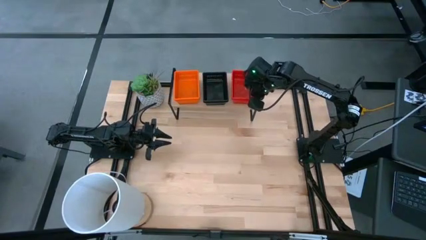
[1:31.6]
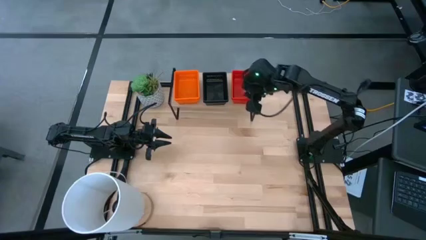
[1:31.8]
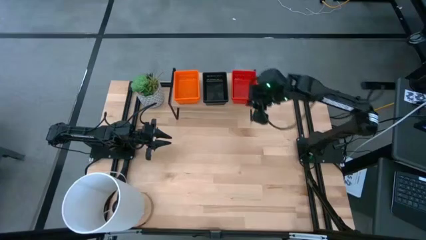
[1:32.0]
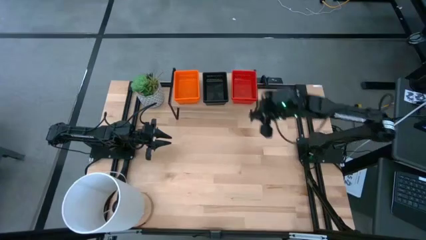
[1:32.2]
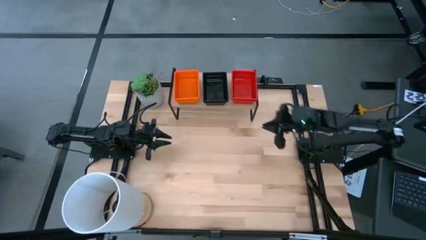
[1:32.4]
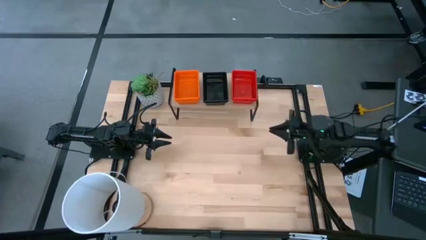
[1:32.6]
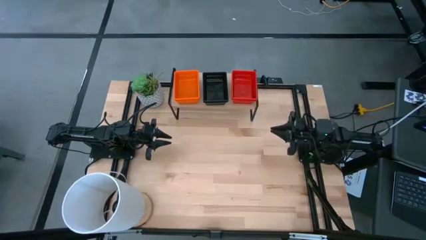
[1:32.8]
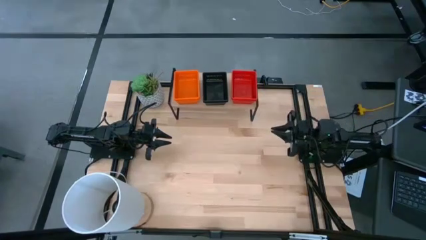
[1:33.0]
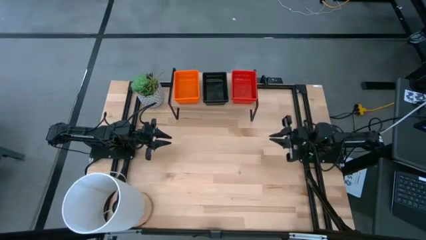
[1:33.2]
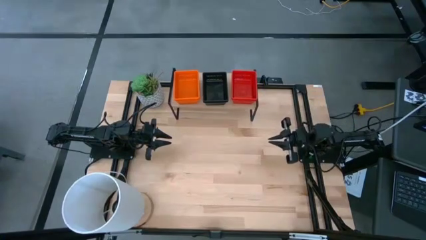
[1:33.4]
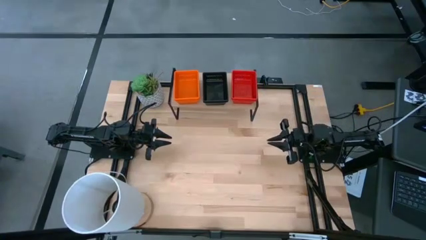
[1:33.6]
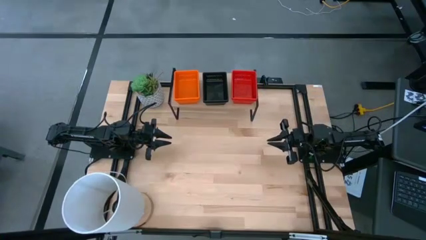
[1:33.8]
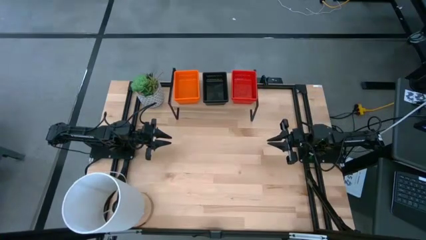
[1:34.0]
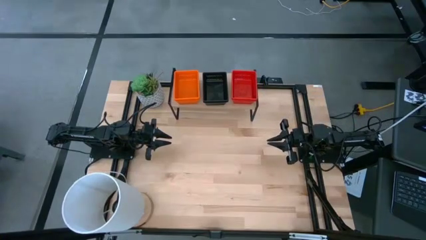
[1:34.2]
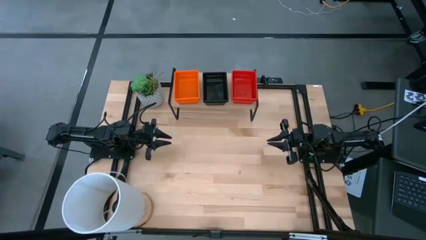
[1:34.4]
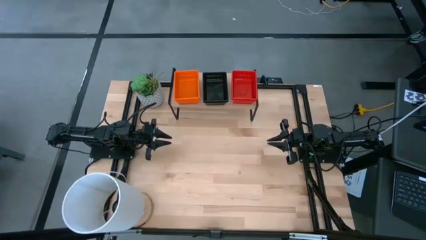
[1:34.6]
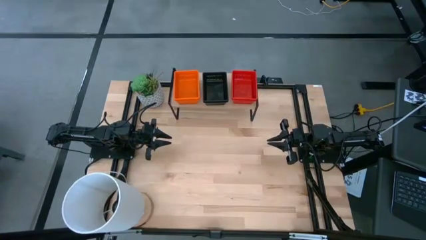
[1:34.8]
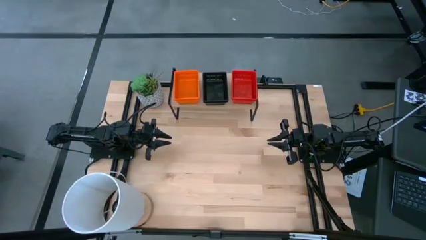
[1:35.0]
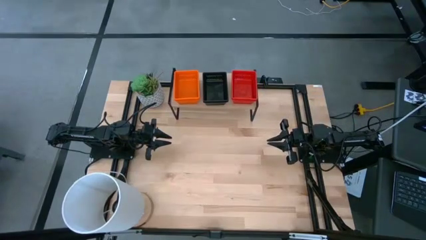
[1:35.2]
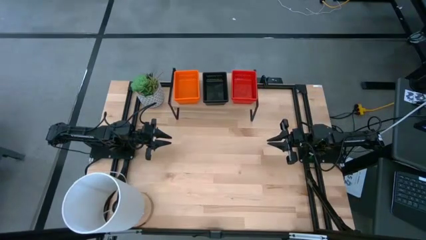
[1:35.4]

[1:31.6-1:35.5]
Task: Stack baskets on shelf by color
Return to Home Position

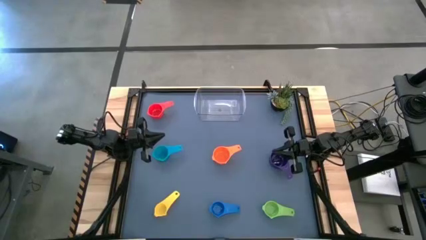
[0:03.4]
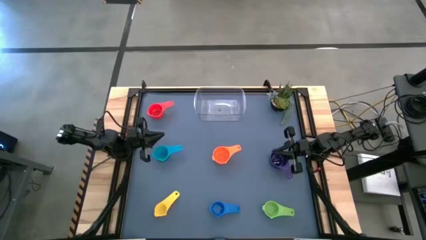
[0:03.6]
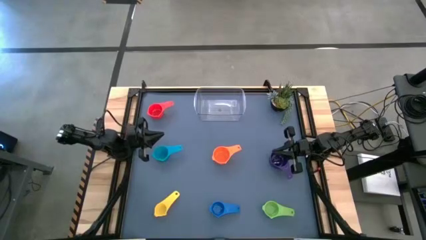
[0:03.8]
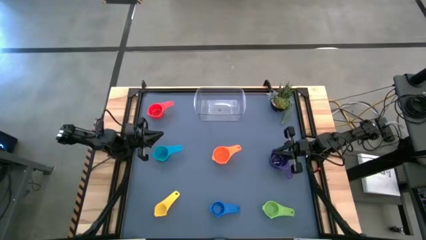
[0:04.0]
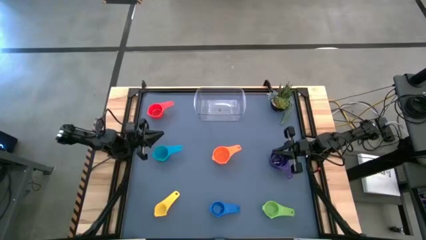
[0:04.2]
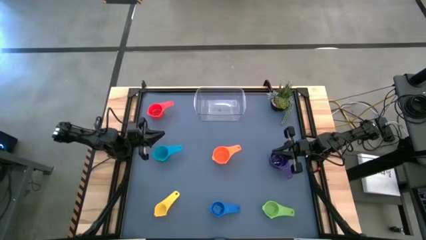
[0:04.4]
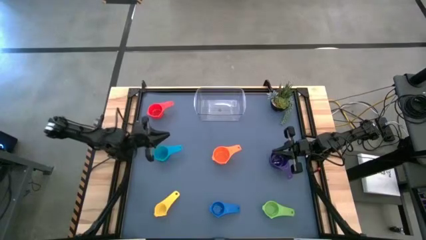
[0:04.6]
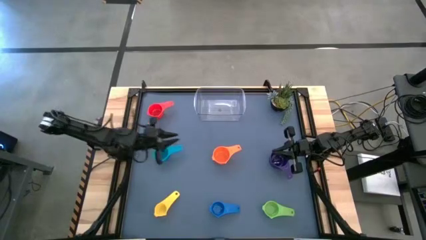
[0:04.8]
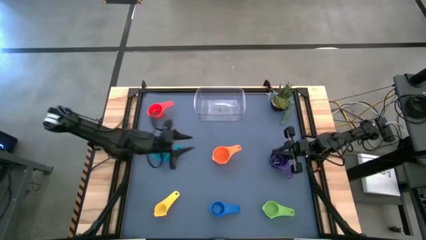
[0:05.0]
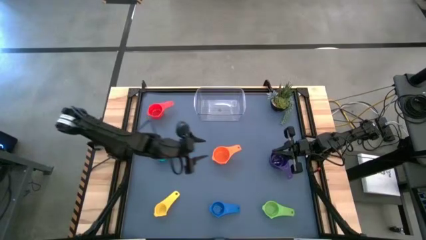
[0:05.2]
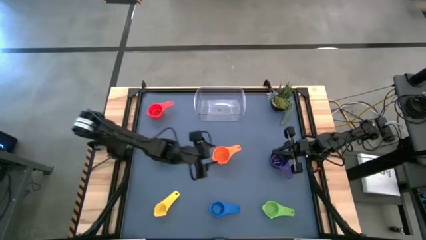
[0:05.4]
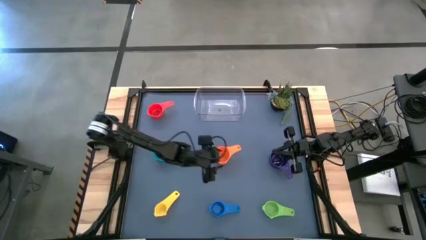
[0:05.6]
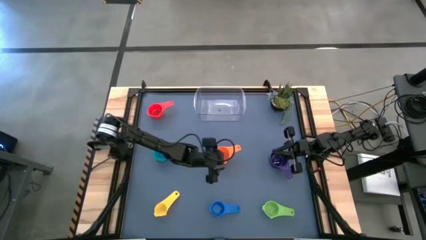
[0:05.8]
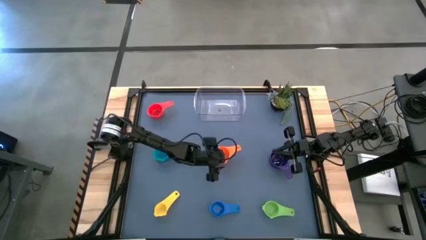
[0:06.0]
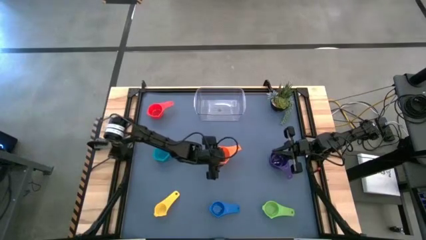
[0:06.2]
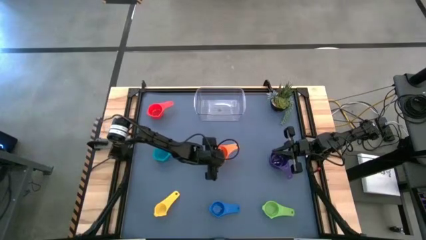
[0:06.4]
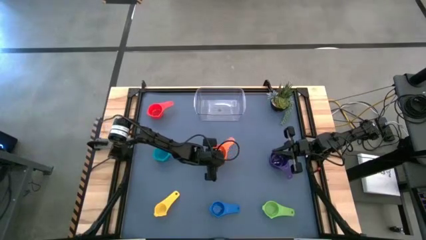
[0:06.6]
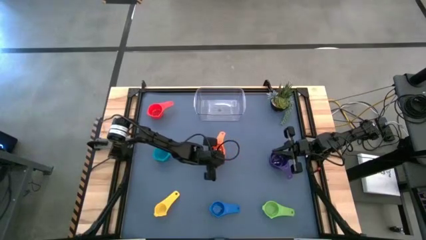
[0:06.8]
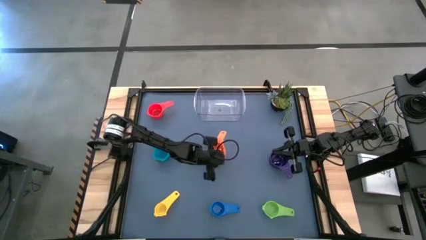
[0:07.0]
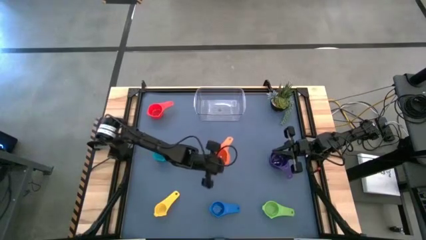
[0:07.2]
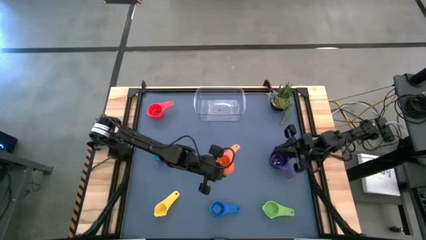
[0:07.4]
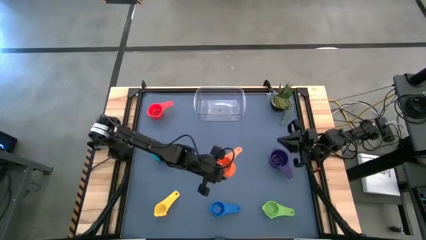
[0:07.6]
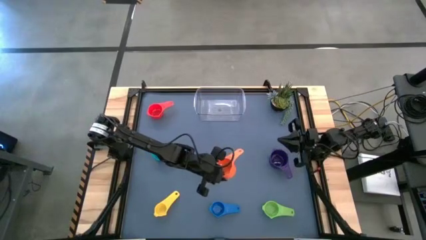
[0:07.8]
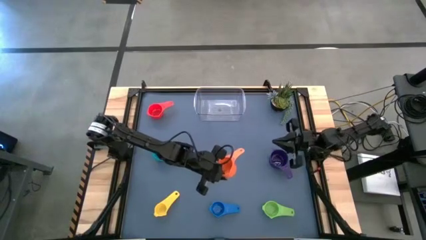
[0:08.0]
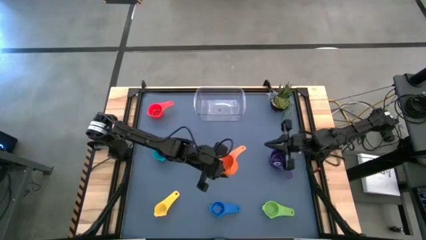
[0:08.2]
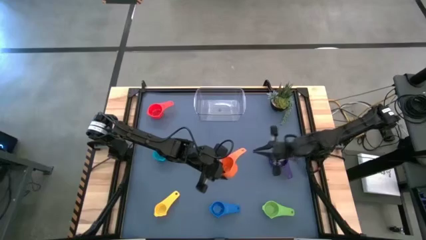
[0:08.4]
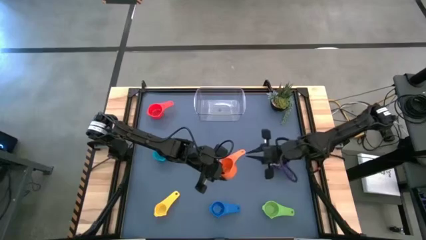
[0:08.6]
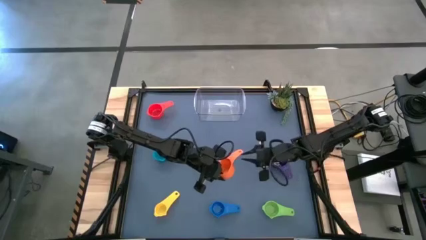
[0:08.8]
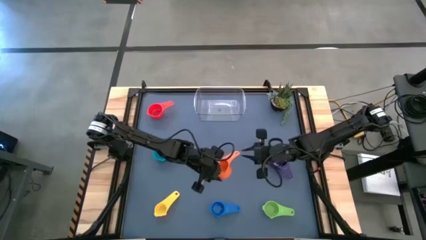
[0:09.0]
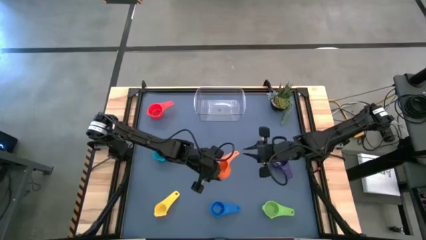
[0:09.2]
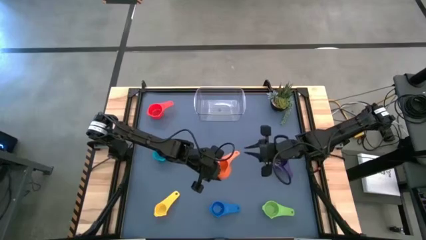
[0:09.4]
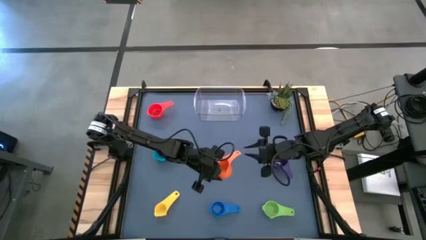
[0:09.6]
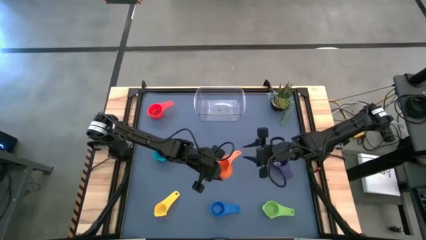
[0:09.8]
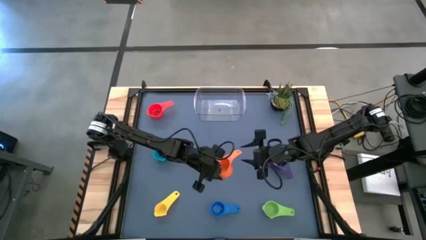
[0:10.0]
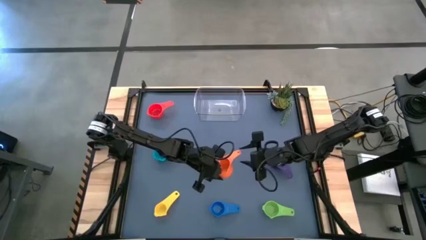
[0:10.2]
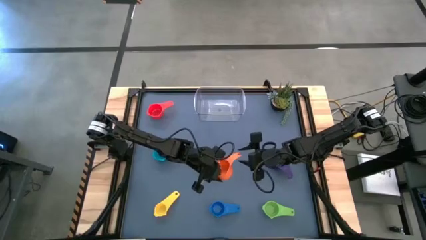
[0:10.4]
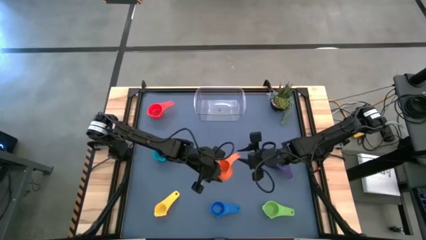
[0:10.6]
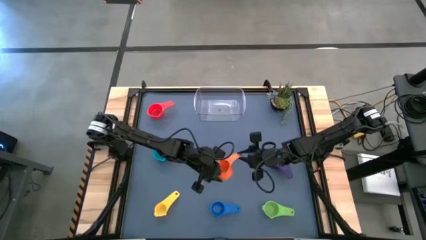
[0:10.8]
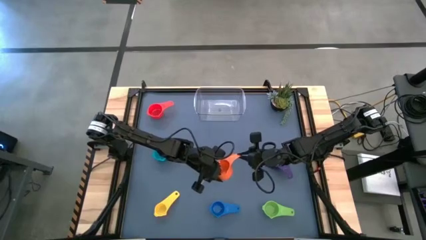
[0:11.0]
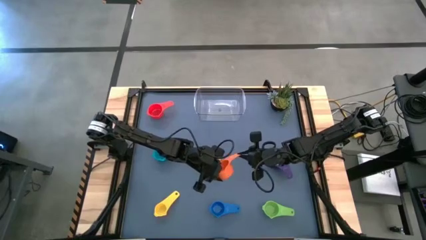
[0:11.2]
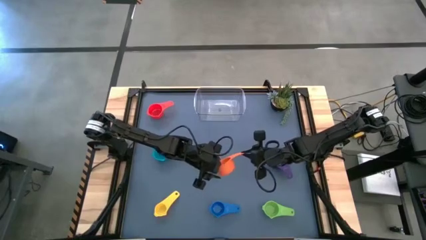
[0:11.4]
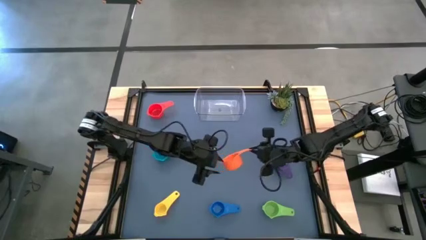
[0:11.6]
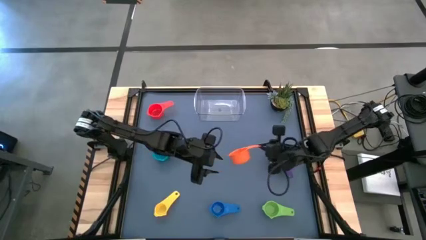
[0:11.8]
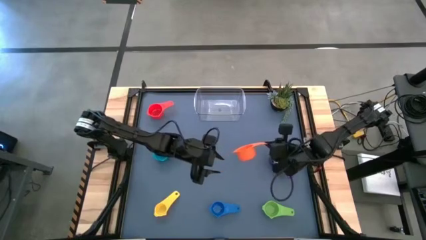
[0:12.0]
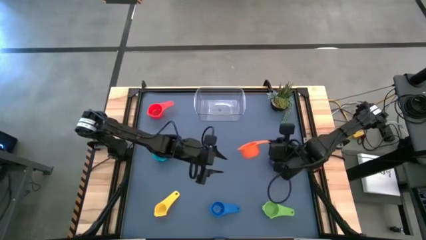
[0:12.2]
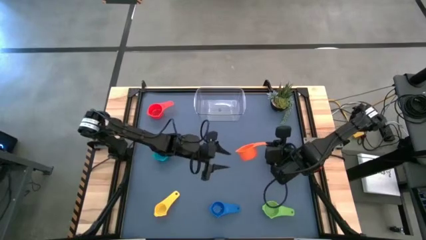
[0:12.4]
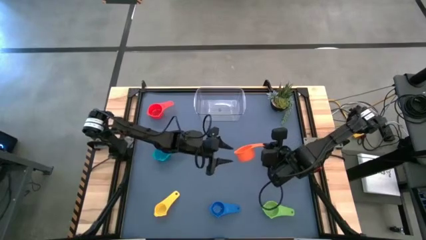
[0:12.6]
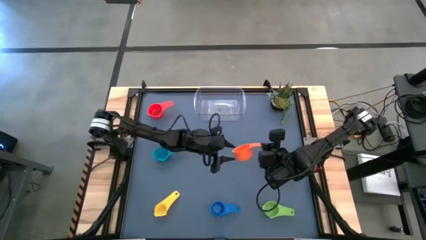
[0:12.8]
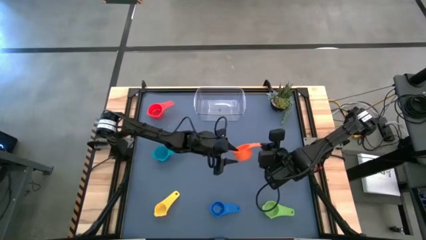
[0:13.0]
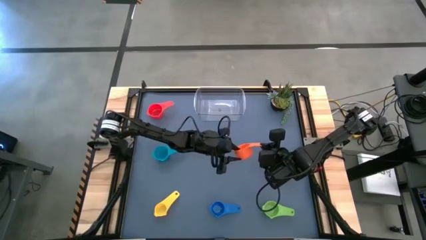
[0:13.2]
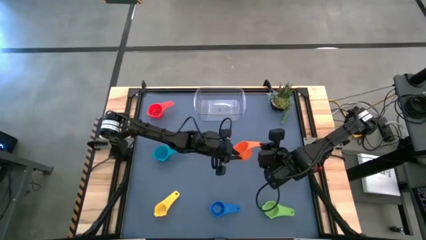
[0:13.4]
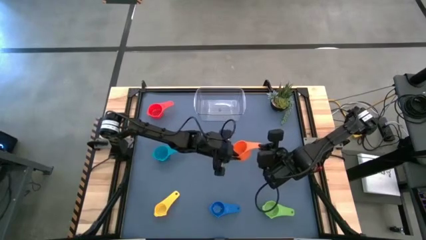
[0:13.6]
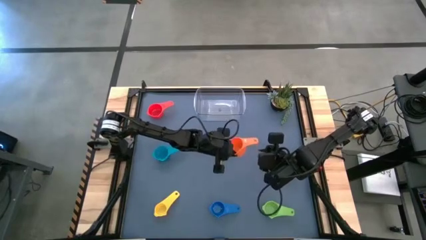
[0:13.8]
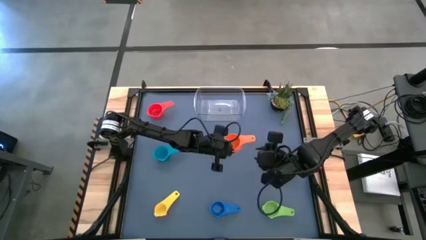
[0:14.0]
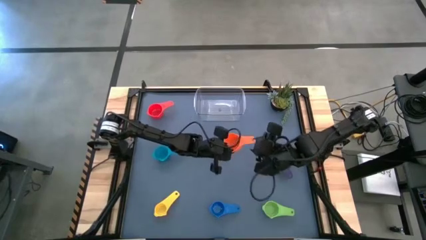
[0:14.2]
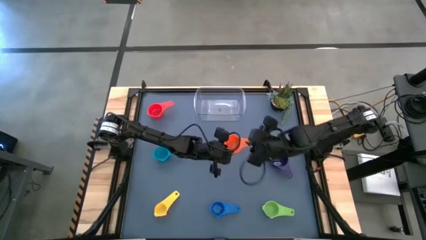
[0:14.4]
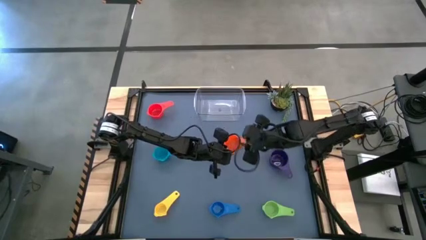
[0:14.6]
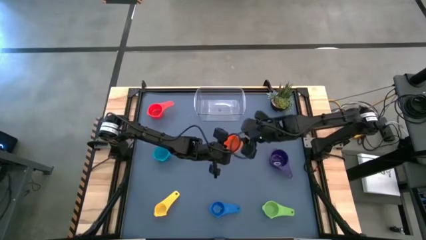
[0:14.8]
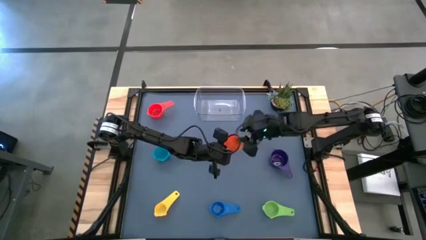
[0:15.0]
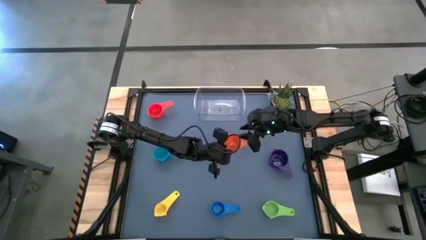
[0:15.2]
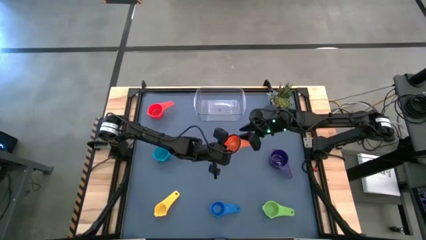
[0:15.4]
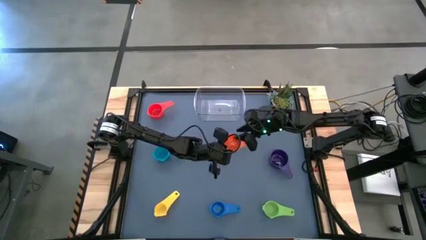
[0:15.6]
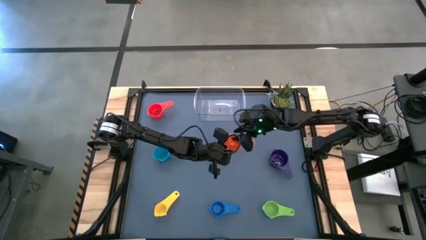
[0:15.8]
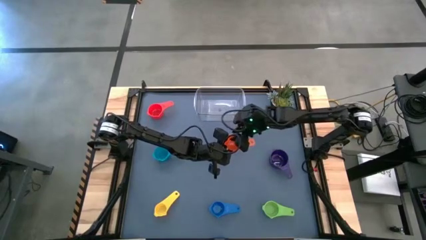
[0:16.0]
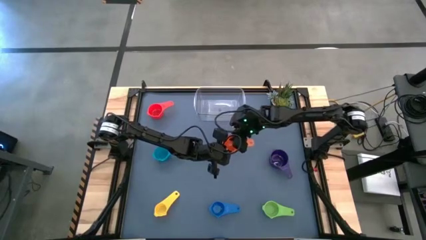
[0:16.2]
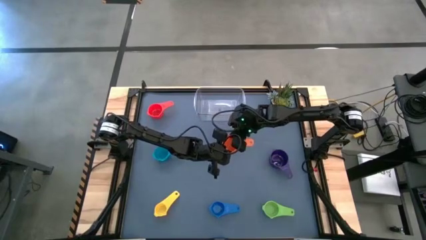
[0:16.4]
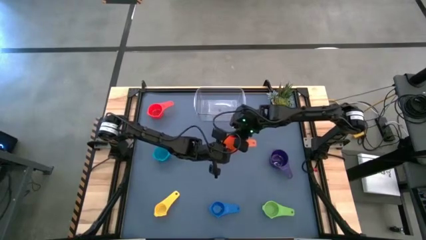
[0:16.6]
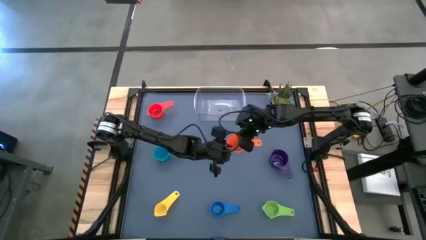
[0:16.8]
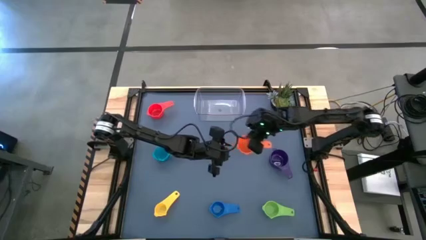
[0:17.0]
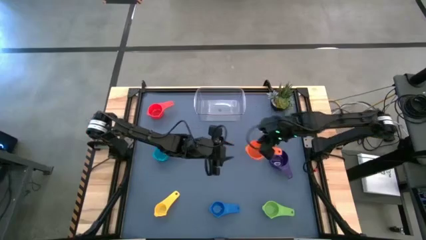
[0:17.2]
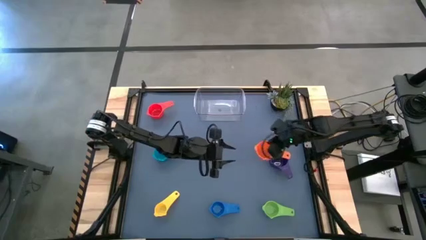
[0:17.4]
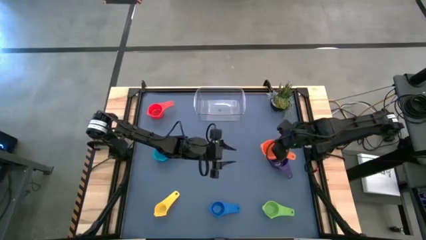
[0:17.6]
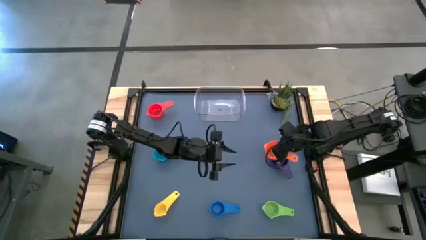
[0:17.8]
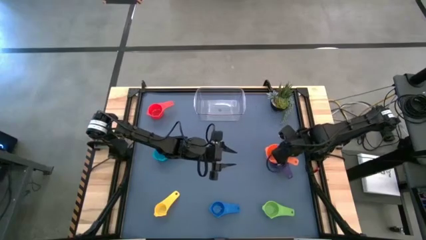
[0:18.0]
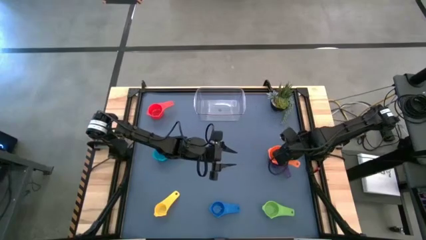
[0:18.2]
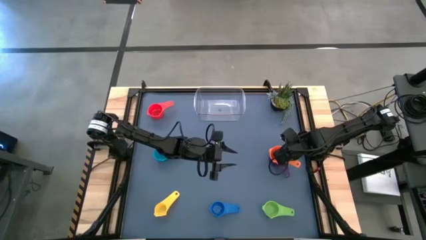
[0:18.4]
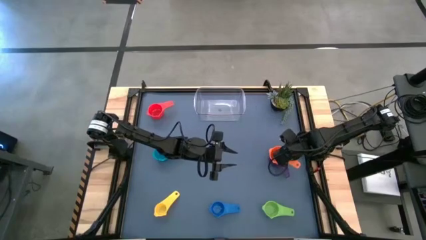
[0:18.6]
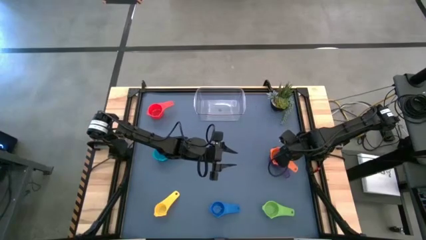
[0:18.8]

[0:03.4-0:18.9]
Task: Nest measuring cups in basket
Stack the orange measuring cup on top of the violet measuring cup
